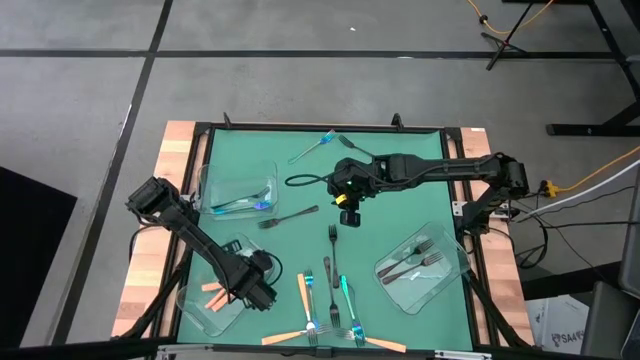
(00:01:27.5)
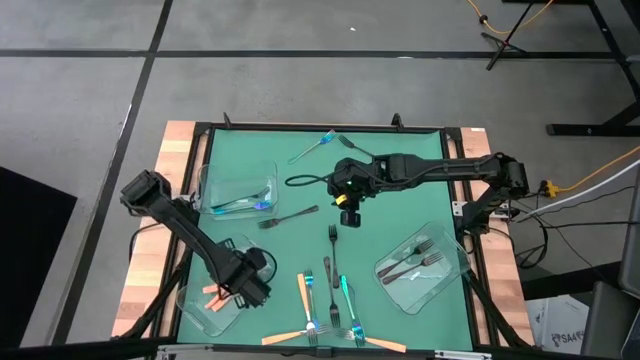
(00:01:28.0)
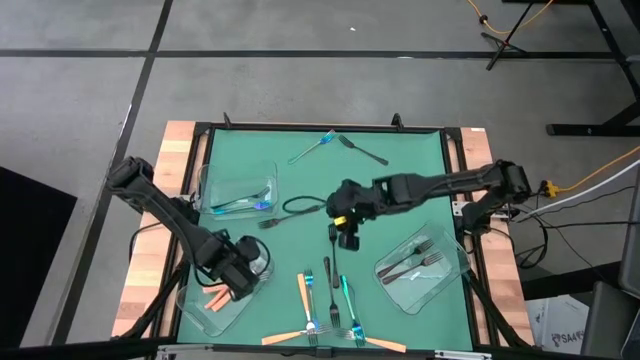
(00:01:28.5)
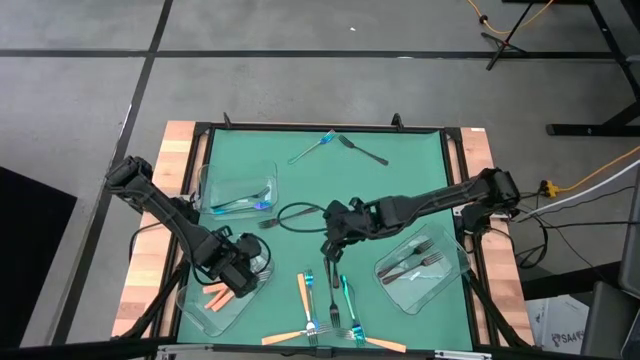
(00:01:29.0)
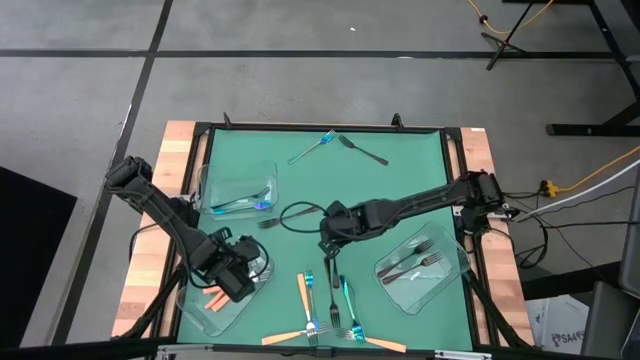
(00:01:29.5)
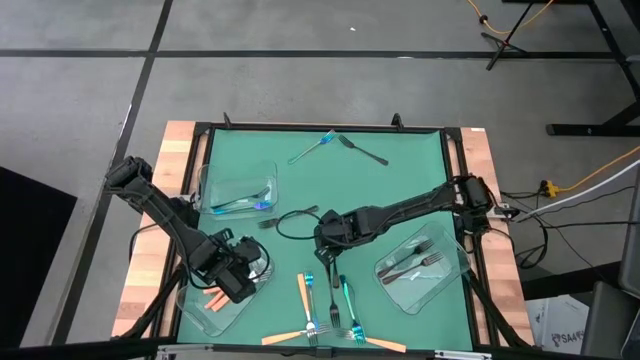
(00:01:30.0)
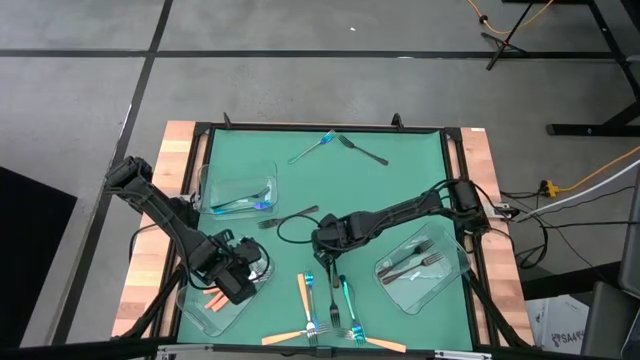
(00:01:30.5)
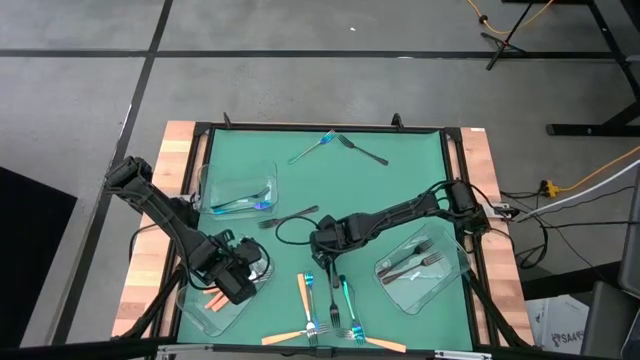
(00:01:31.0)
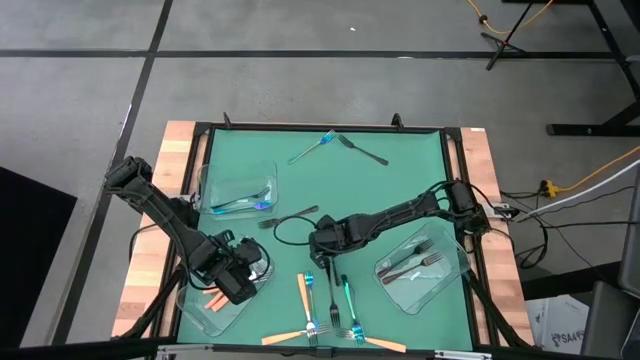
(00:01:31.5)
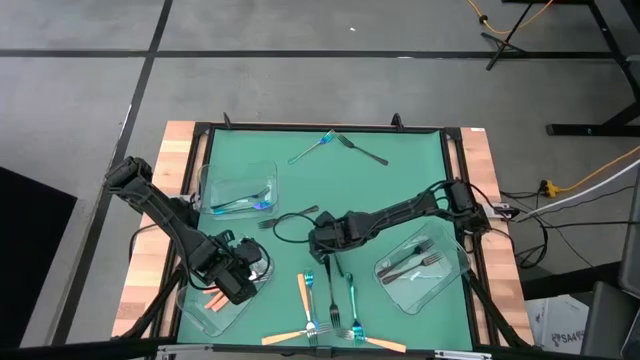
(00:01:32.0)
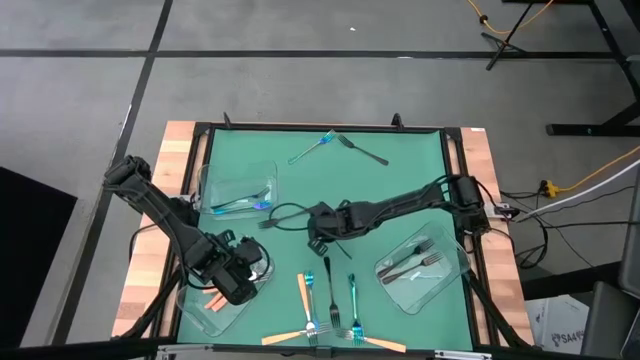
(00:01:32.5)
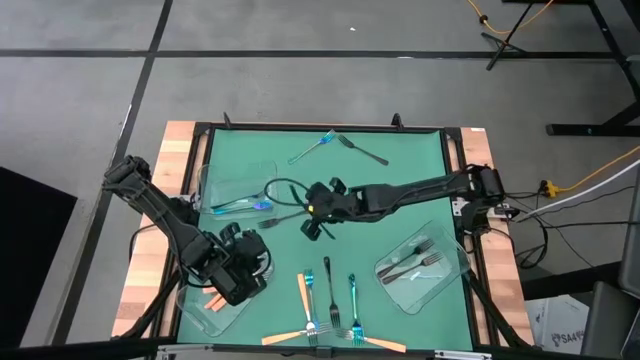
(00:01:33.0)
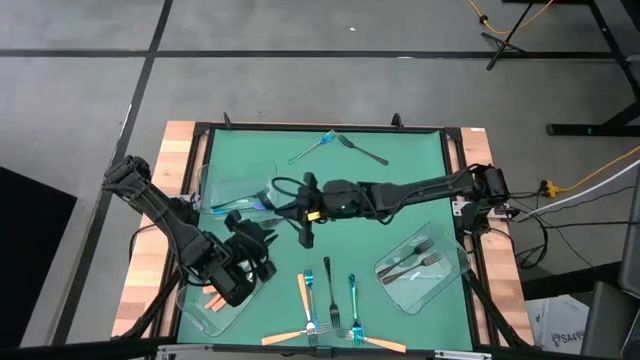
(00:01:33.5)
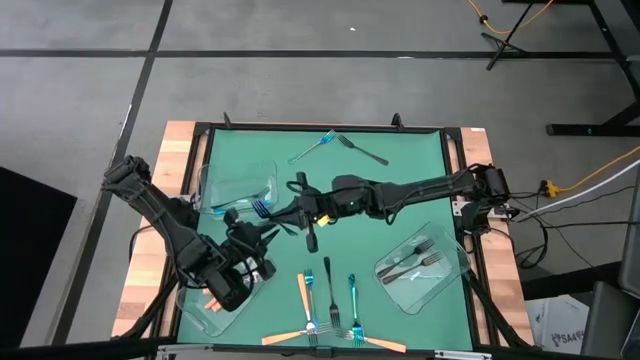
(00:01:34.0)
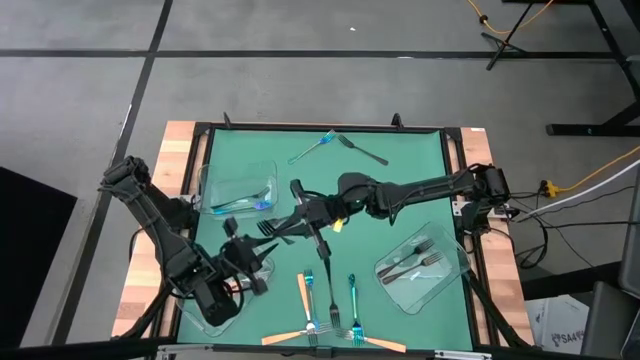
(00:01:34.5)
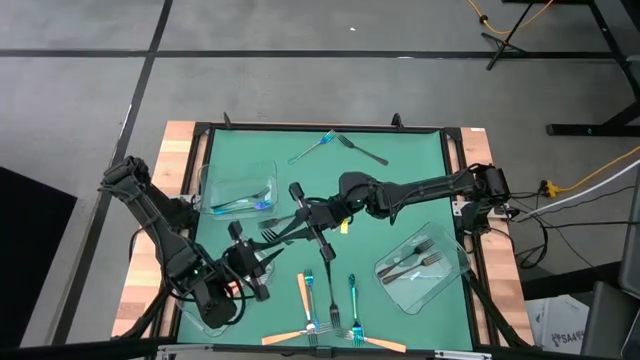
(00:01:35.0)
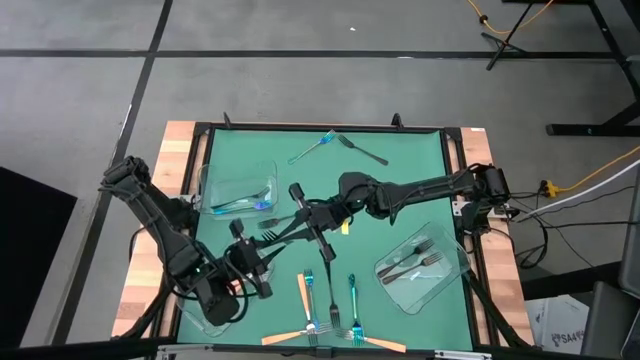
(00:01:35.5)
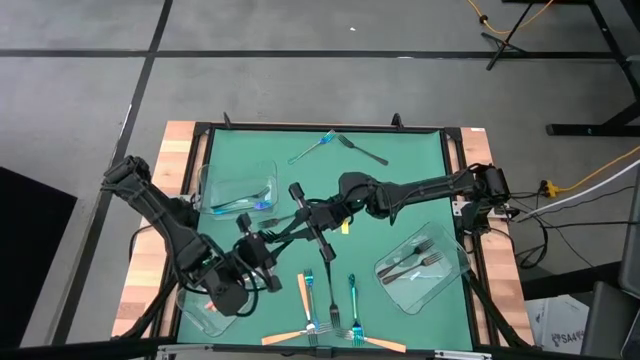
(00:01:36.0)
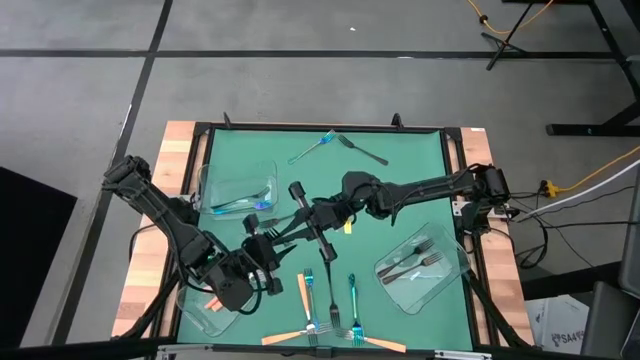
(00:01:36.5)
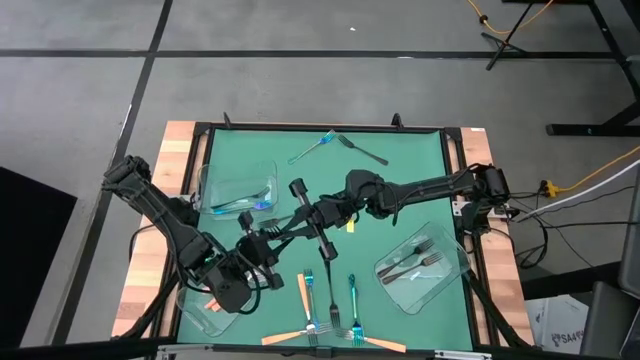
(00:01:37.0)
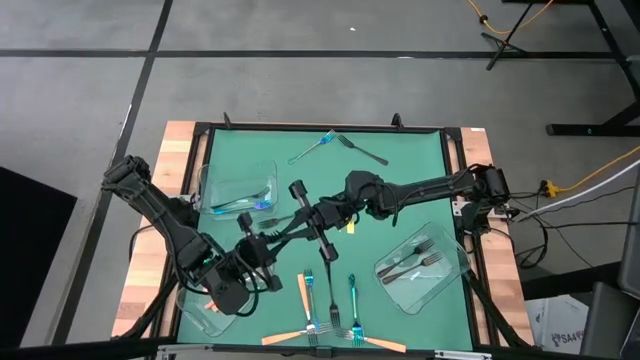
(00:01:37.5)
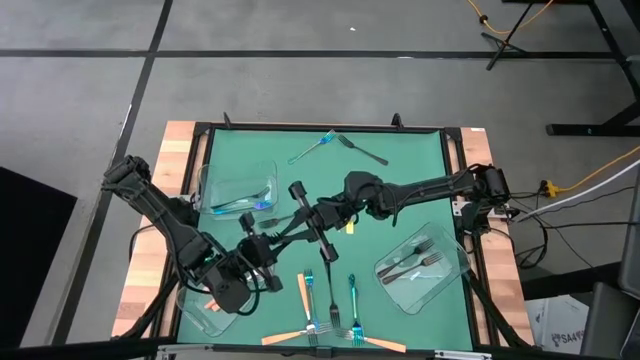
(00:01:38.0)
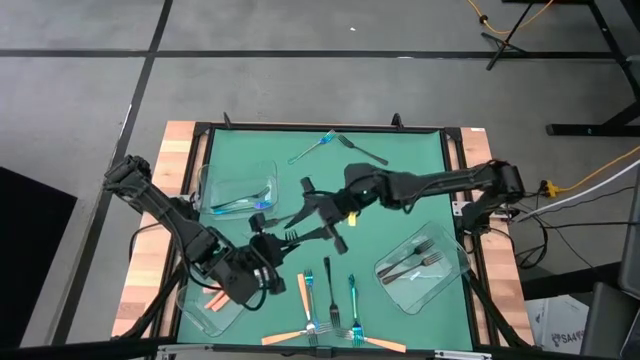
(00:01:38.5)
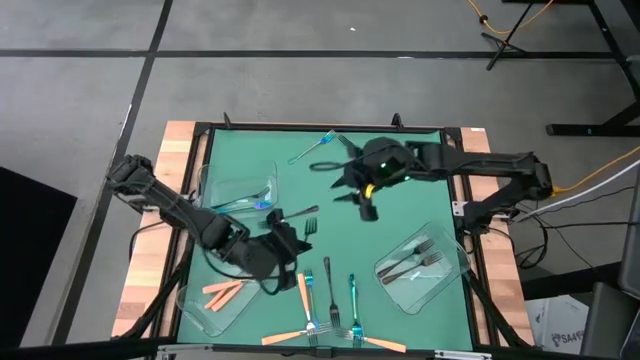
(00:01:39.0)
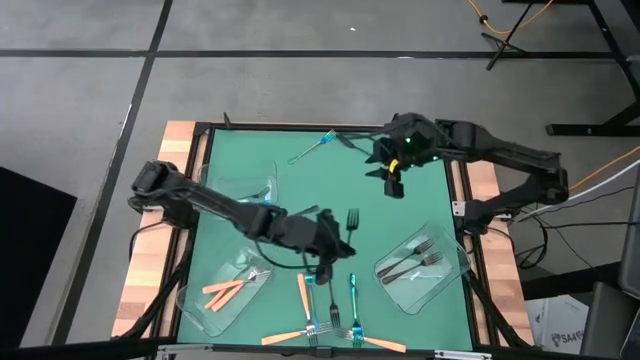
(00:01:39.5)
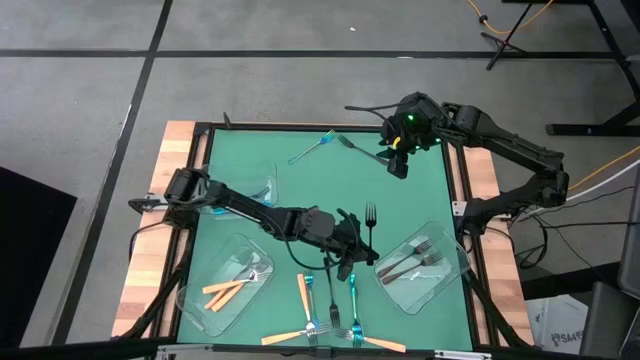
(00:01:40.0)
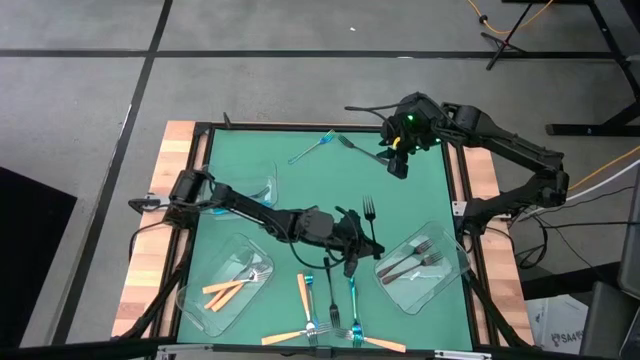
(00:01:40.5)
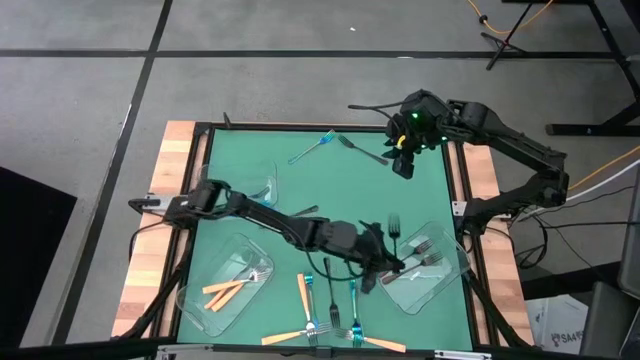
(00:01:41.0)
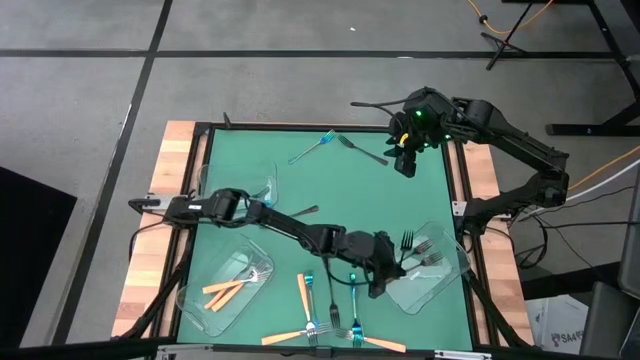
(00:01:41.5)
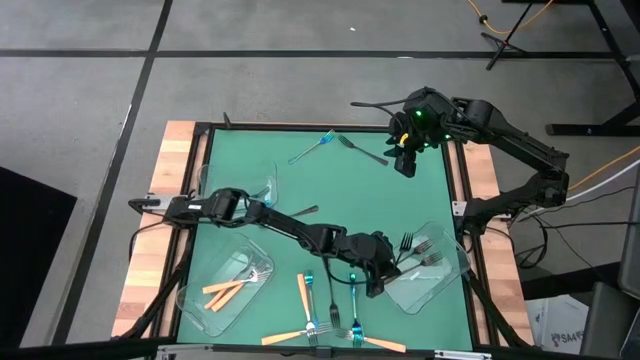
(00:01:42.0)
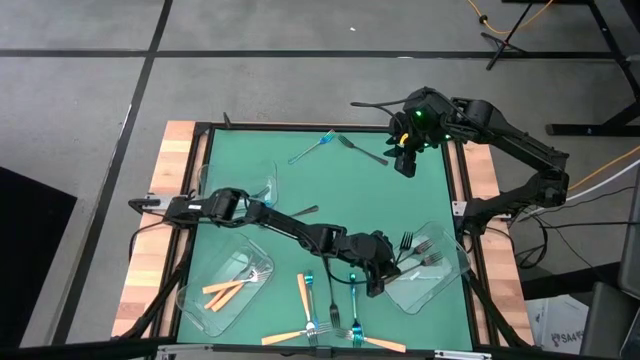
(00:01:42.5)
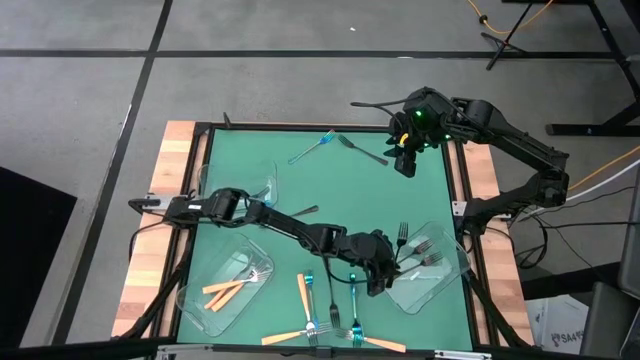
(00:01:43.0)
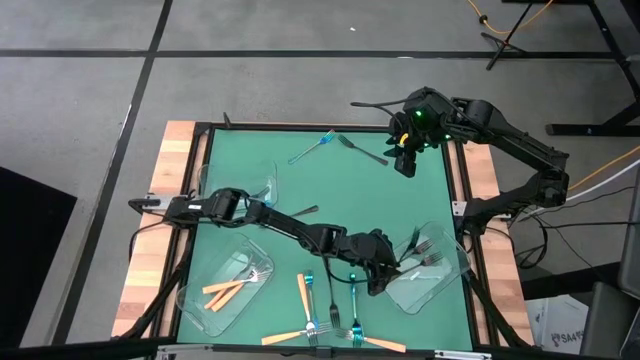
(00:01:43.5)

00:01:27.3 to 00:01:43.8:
Task: Sort silverware by color (type)
Put the black fork into the bottom right transparent bin
